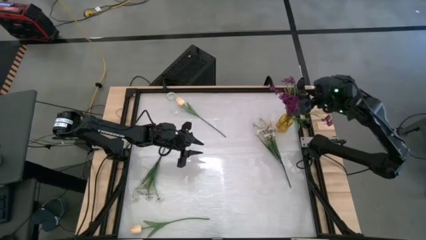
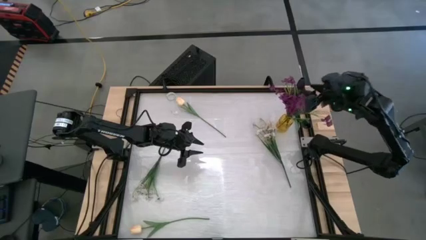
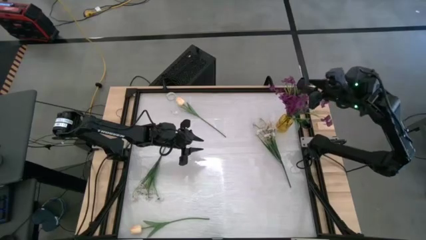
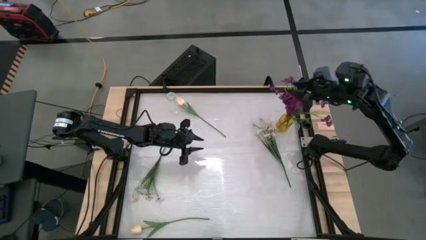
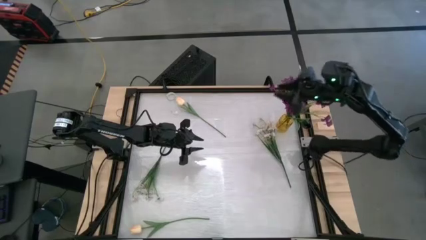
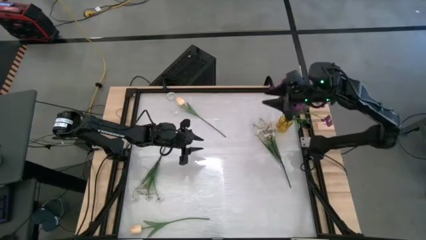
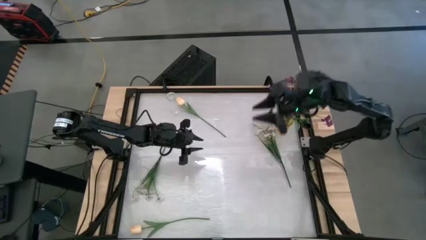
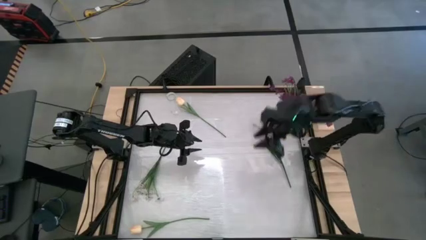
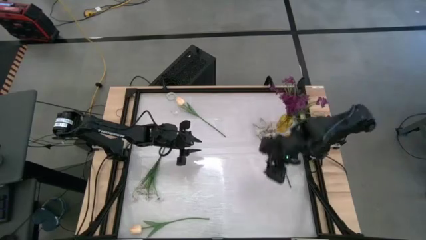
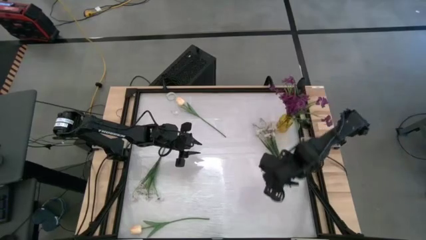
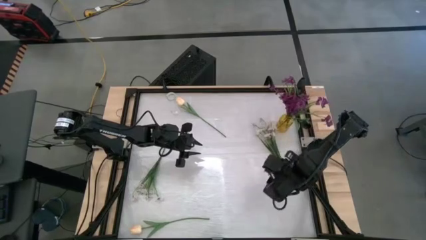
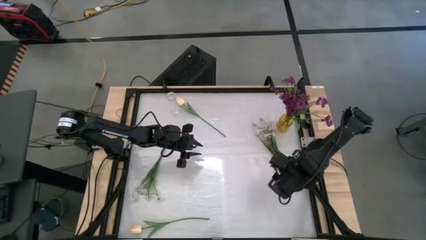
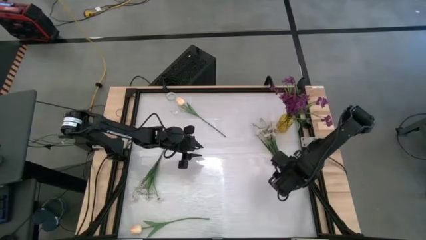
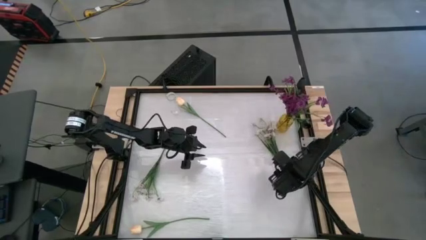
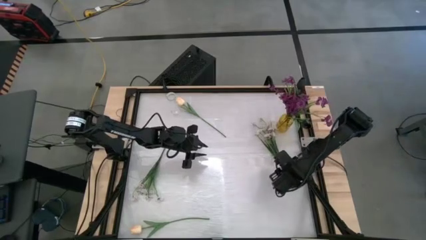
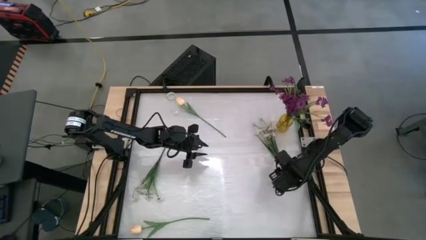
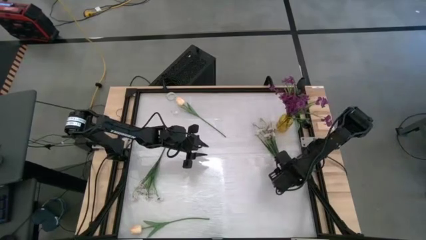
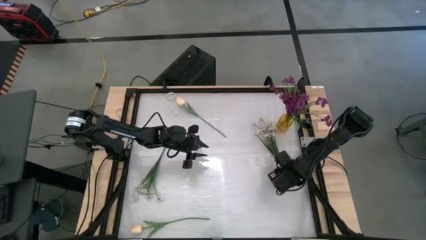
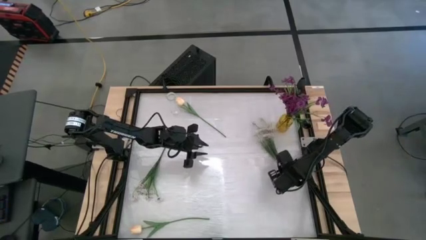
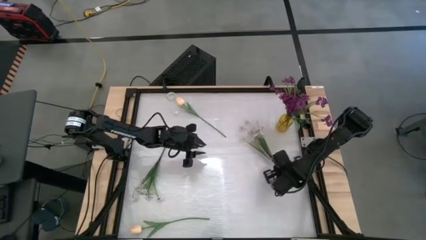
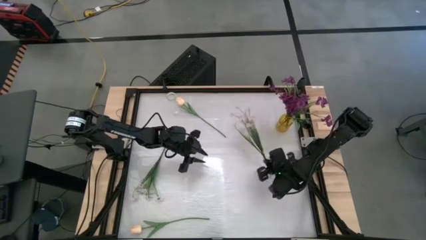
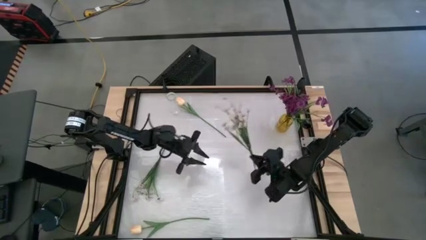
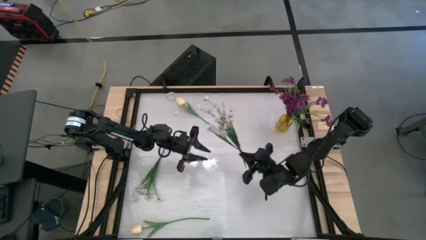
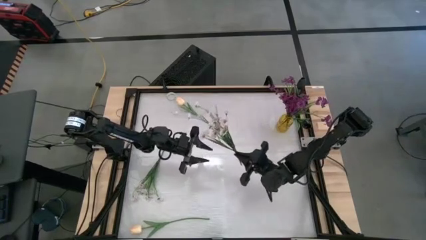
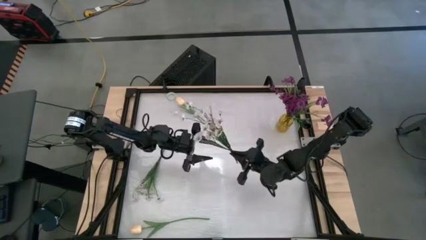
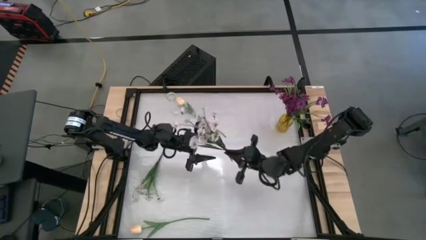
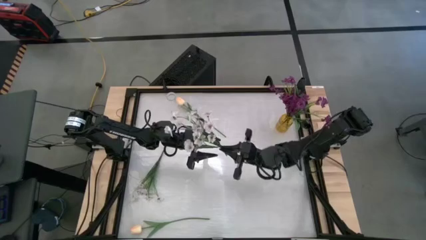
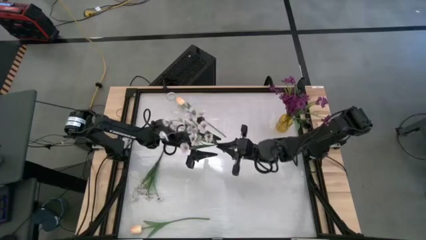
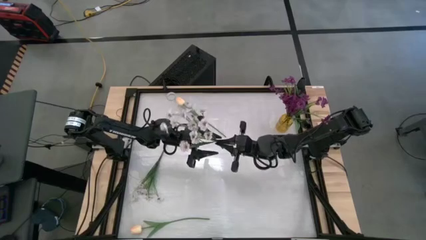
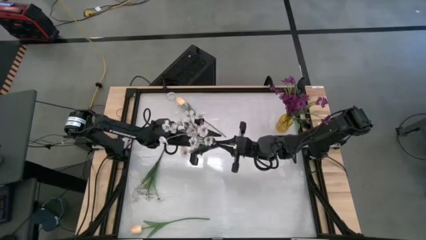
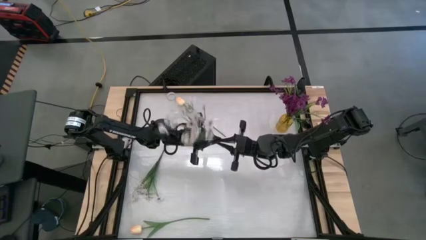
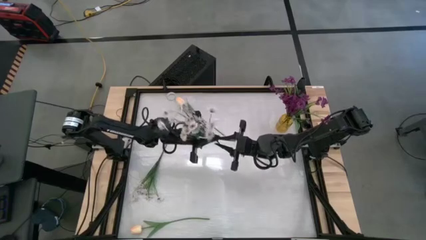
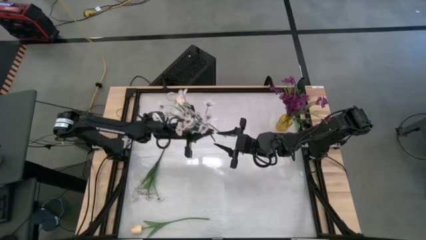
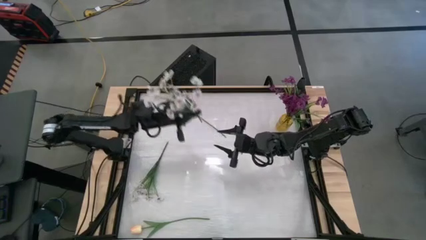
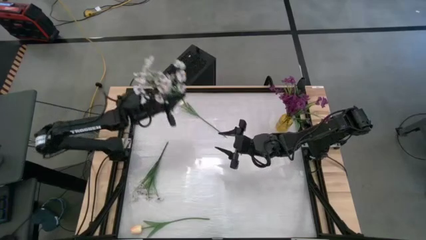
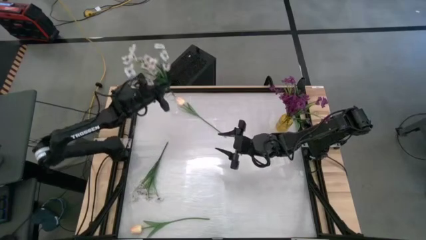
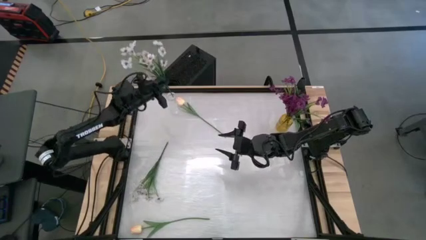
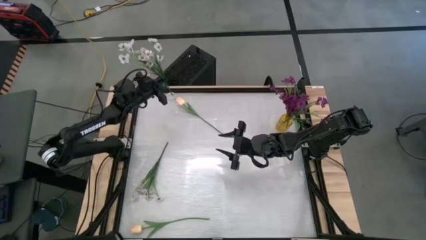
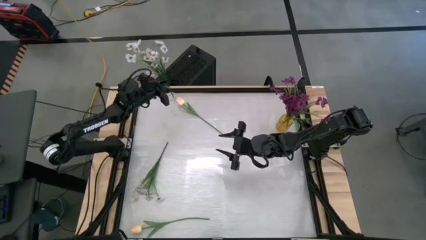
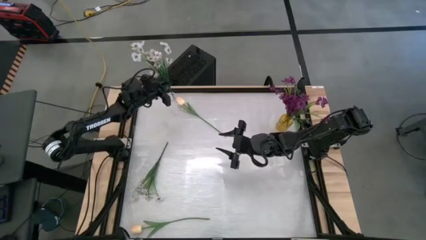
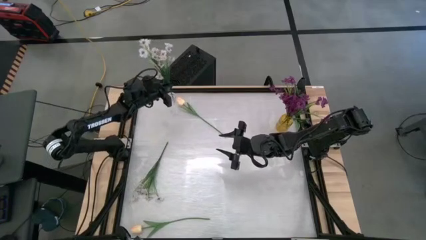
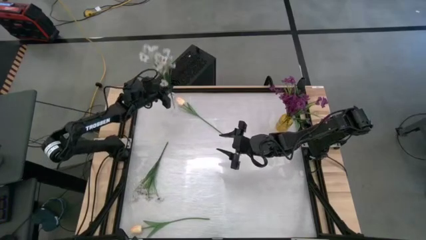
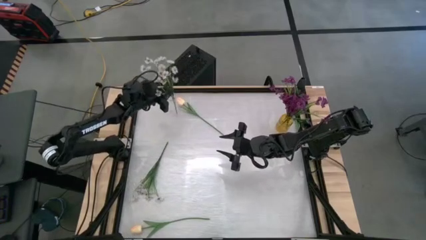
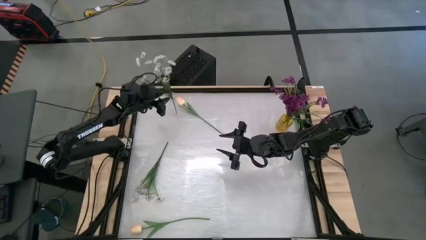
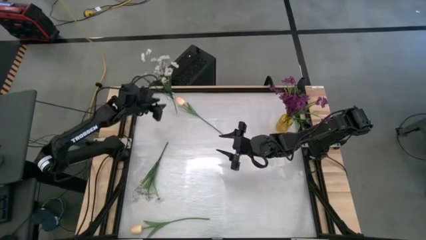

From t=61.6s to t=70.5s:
Task: Sort flowers into vase by color
Put the right white flower into the transparent vase

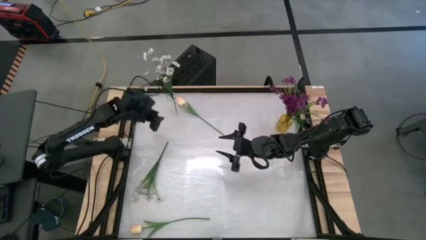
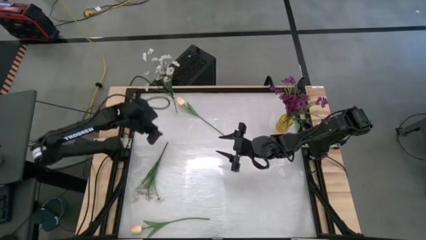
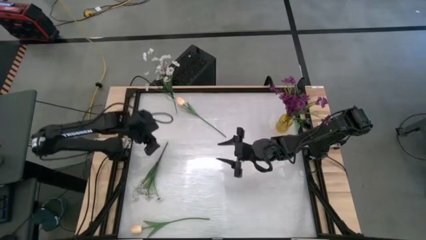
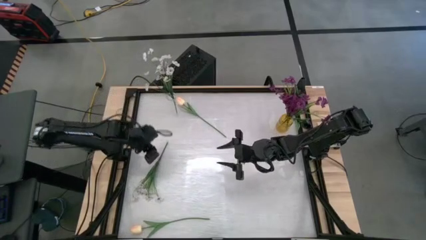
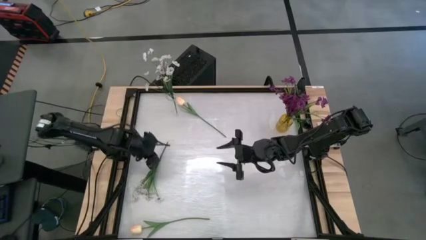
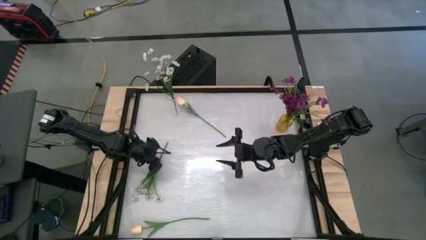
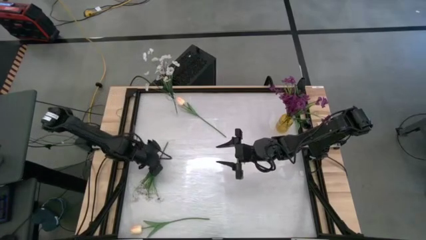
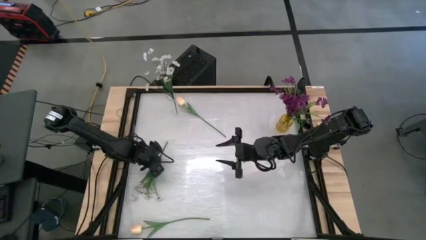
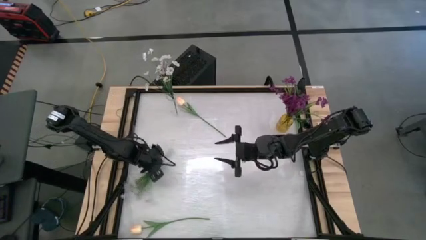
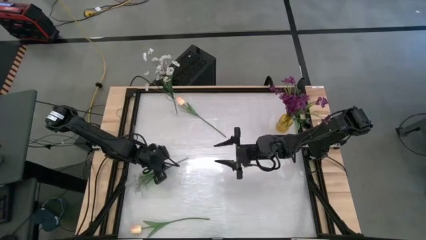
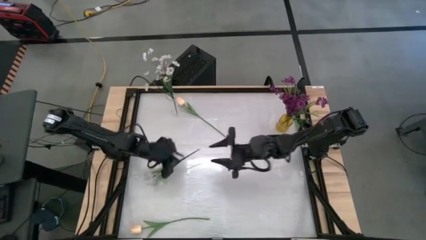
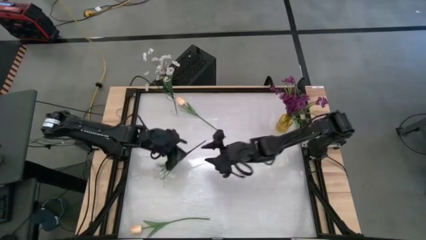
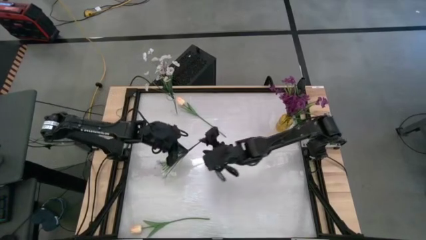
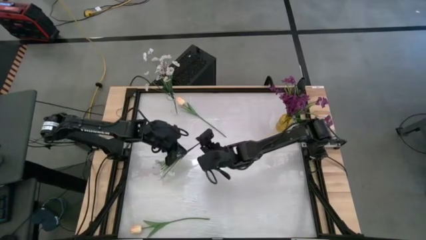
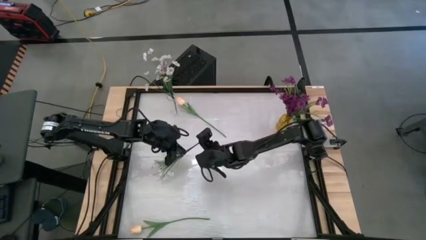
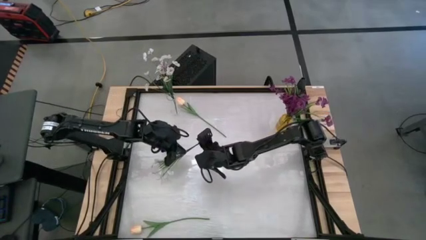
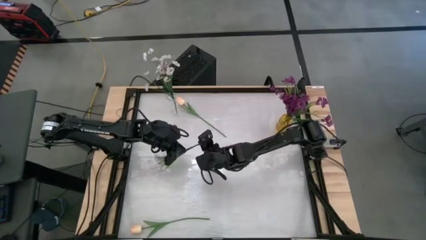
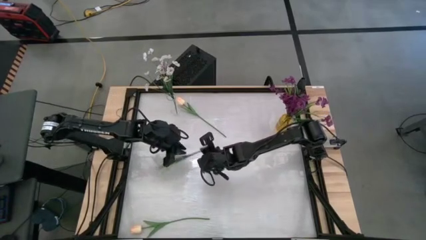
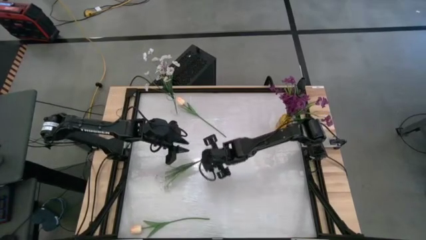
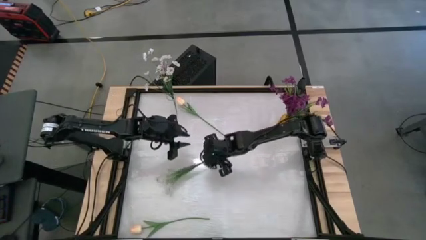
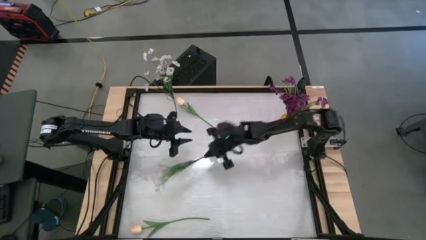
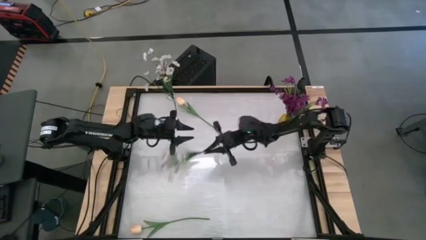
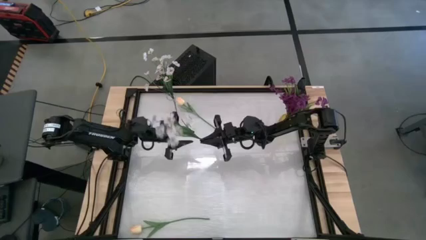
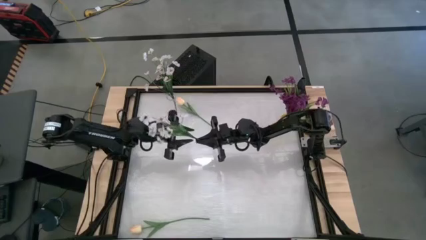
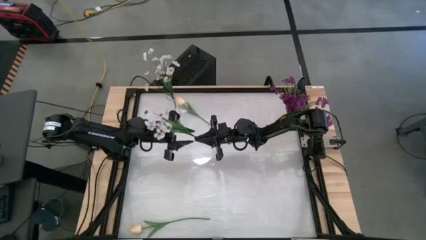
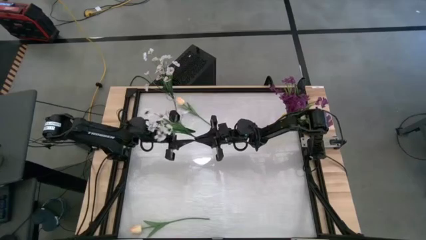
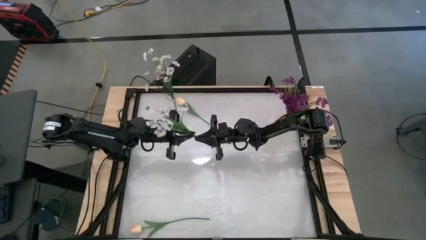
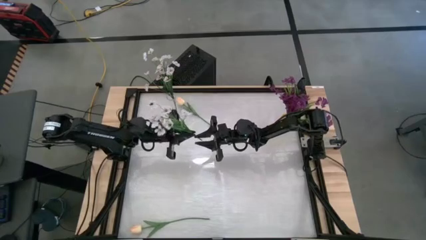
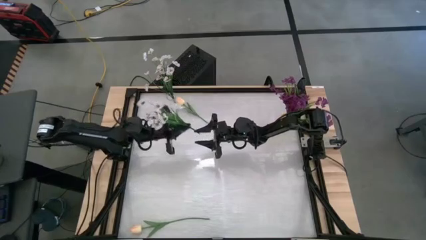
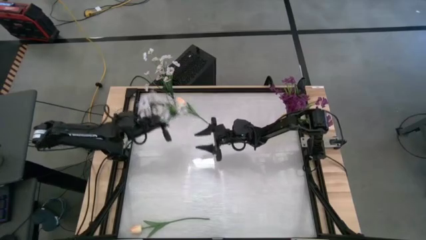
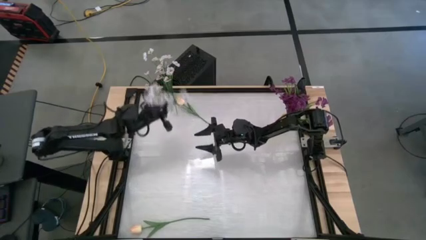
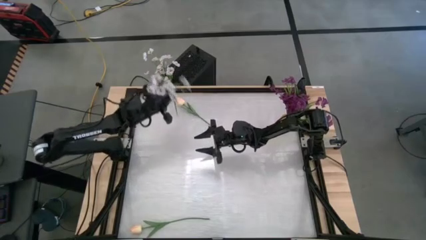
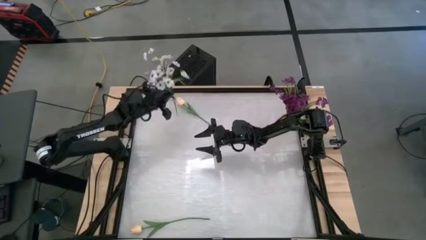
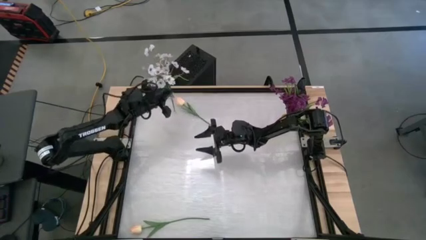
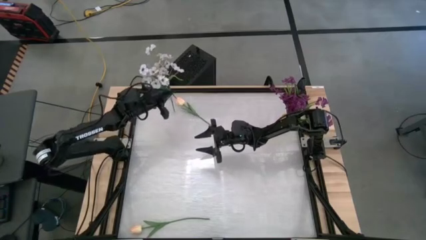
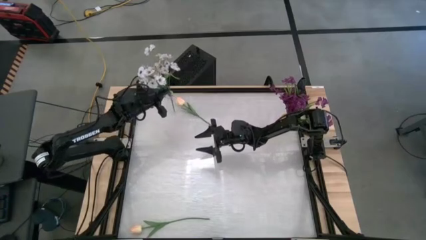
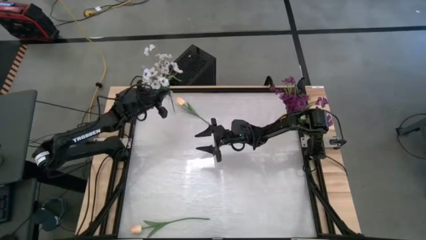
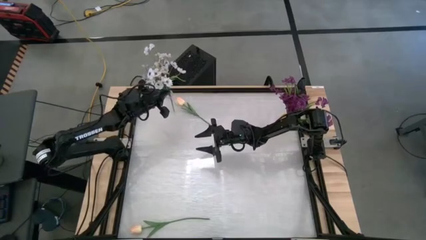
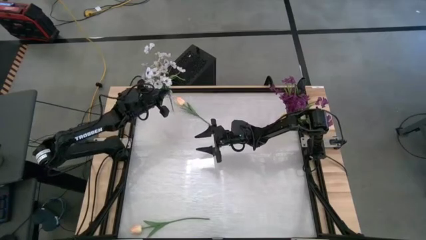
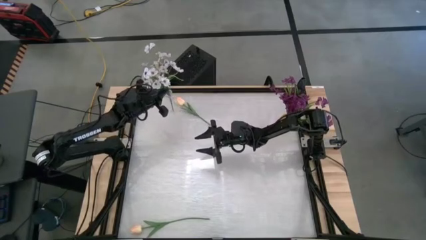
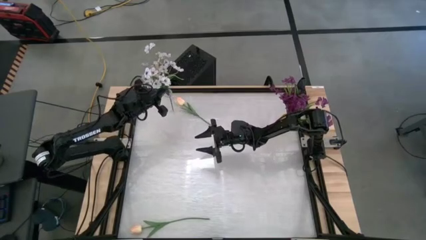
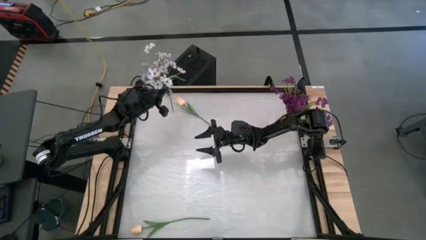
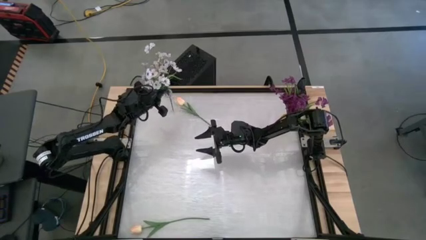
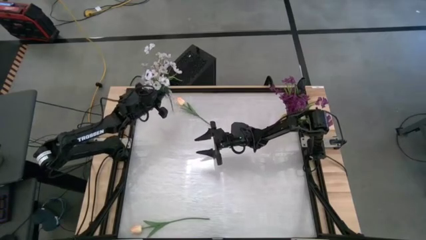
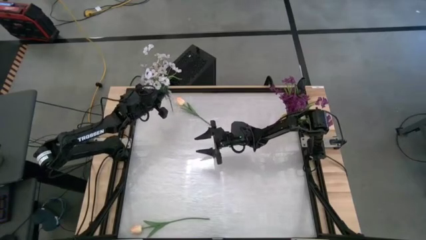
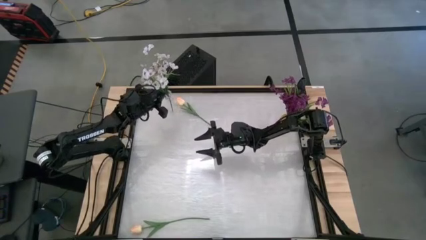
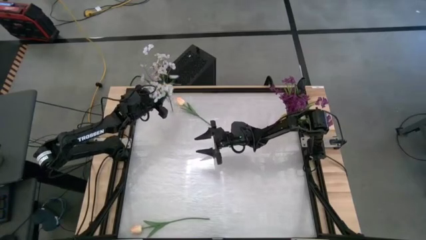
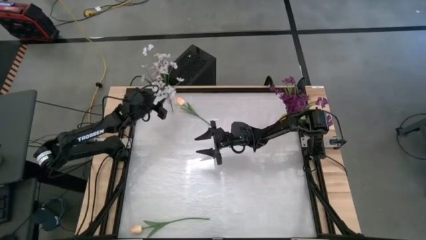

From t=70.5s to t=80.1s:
Put the white flower into the transparent vase
